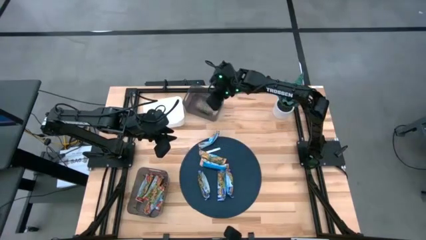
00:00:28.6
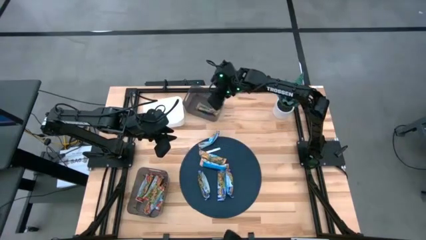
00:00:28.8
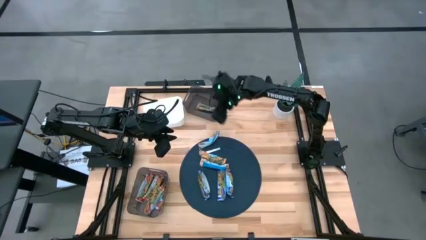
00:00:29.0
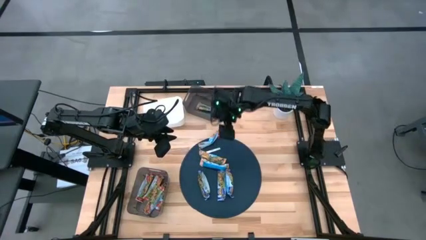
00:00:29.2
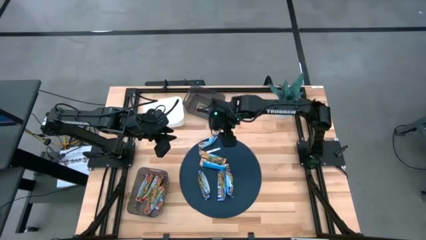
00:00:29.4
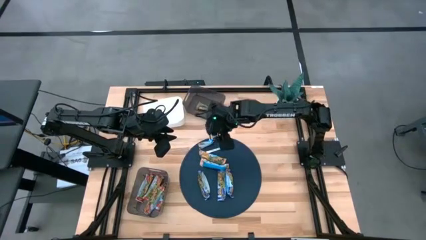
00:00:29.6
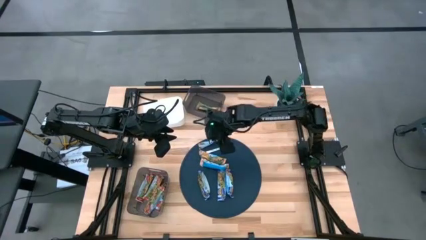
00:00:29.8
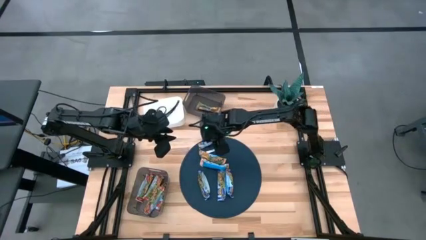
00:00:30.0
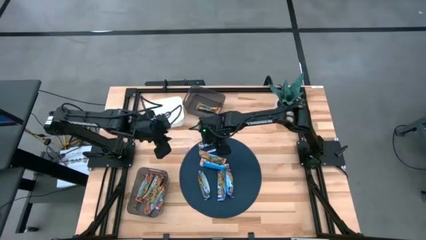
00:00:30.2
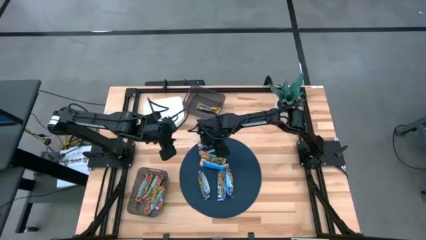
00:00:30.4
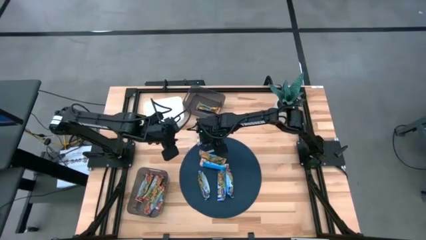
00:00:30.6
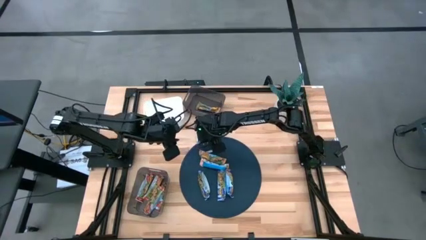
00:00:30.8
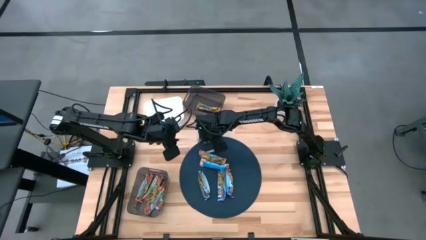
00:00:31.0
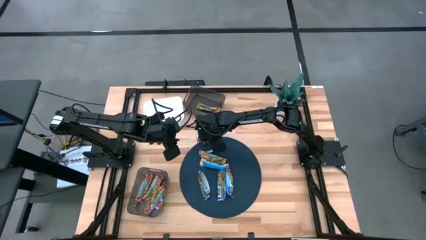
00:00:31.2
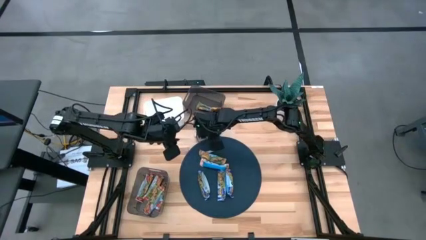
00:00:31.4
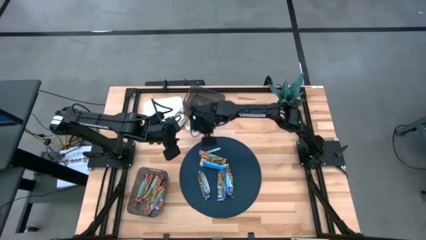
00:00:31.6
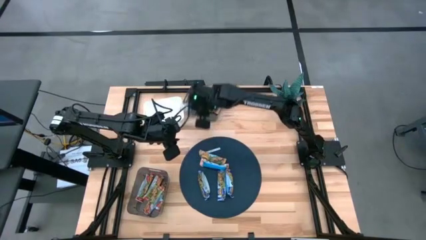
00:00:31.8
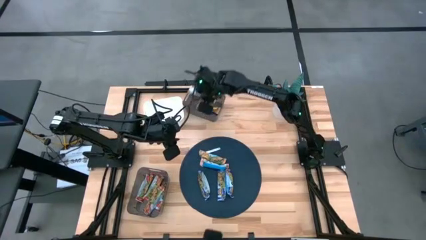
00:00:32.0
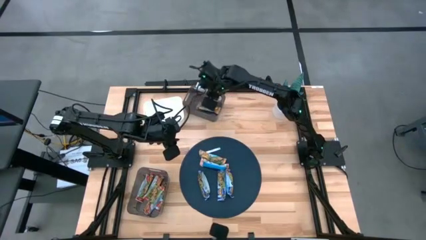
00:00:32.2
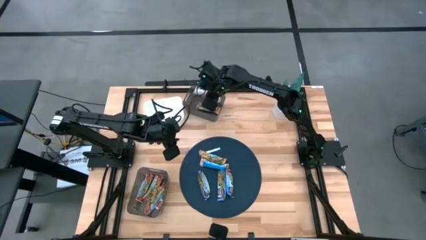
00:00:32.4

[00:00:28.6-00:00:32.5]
Task: Pick and place Granola Bars by type
Put the yellow granola bar into the top black bin

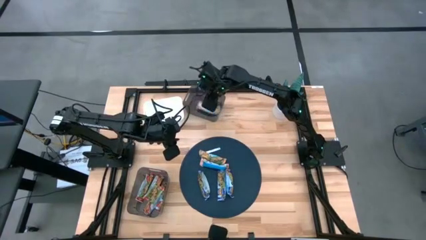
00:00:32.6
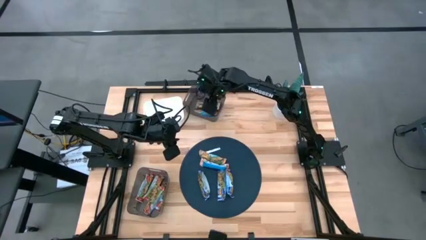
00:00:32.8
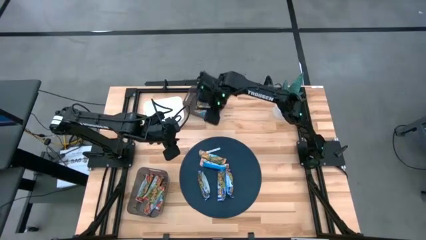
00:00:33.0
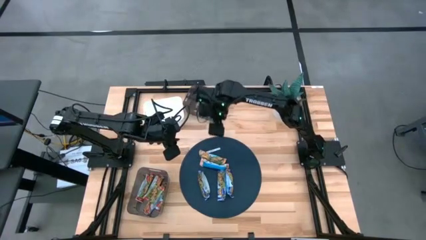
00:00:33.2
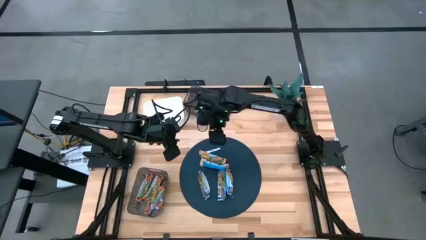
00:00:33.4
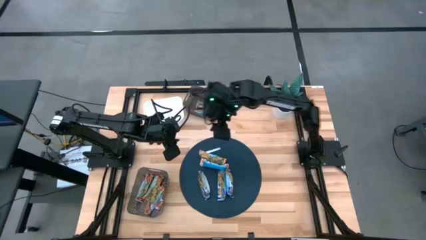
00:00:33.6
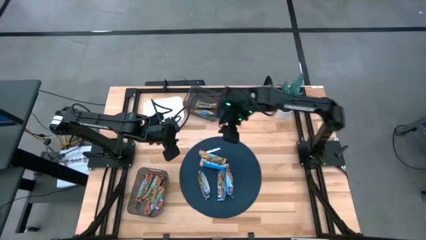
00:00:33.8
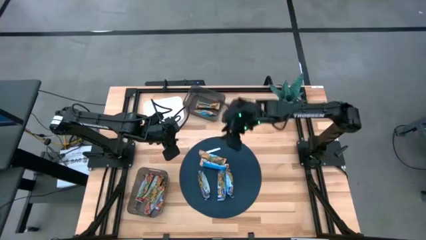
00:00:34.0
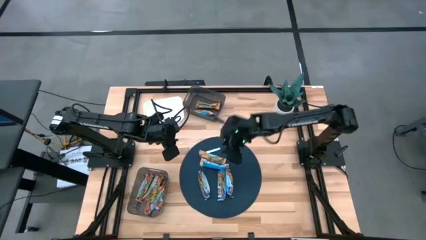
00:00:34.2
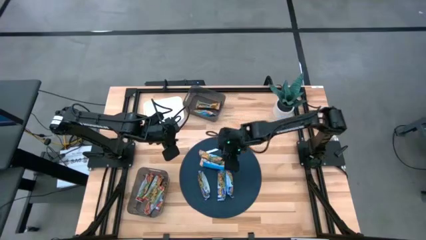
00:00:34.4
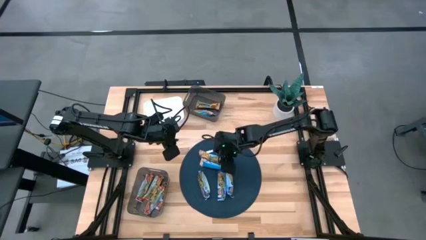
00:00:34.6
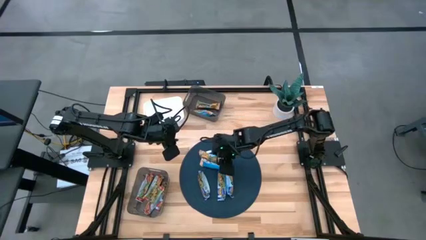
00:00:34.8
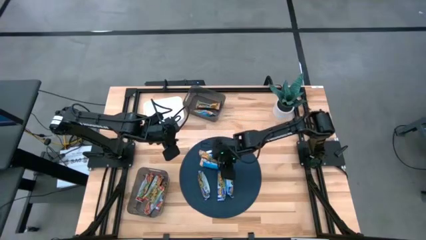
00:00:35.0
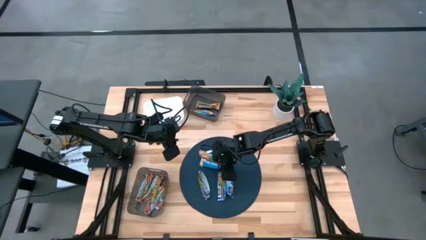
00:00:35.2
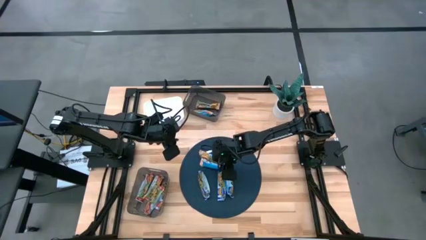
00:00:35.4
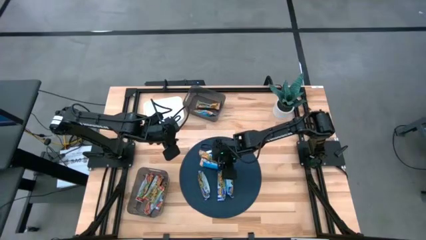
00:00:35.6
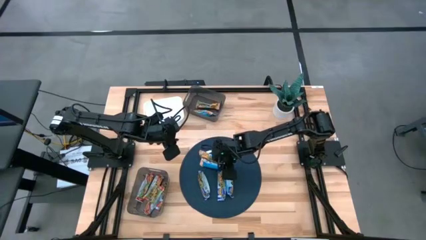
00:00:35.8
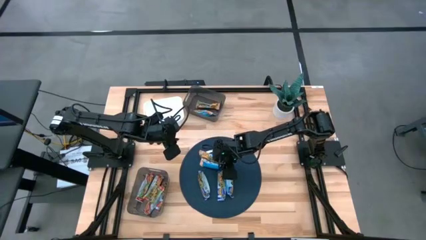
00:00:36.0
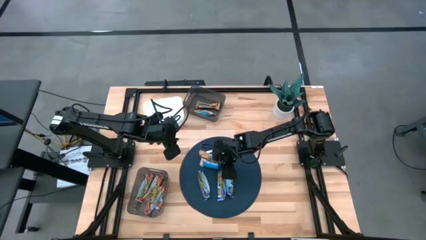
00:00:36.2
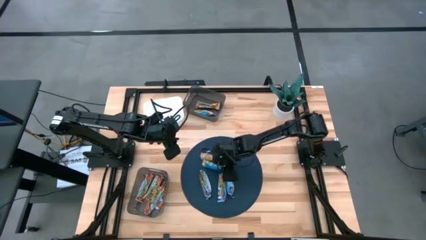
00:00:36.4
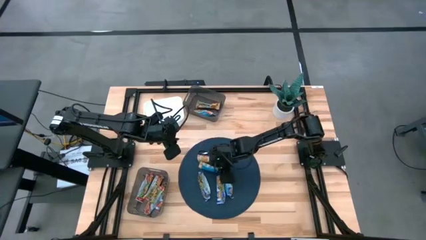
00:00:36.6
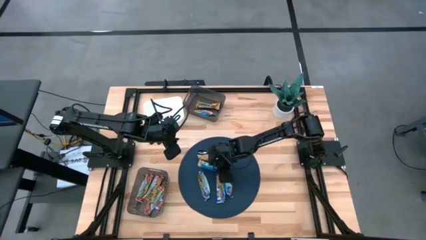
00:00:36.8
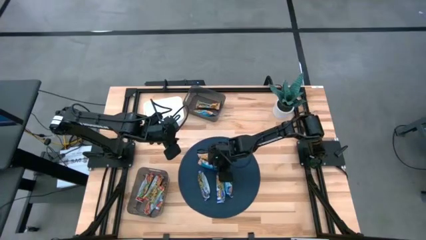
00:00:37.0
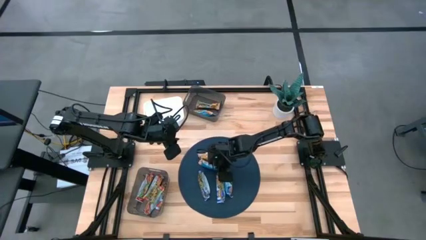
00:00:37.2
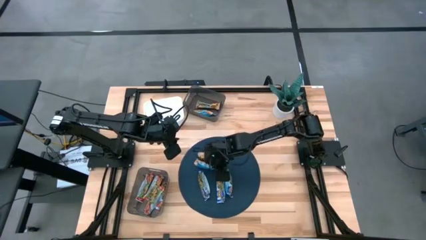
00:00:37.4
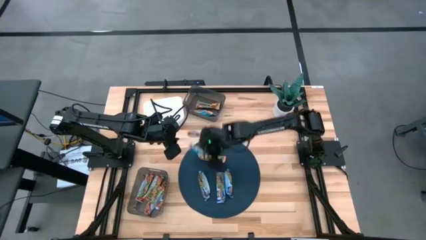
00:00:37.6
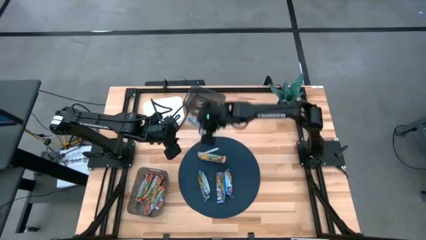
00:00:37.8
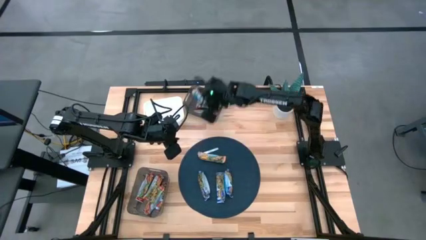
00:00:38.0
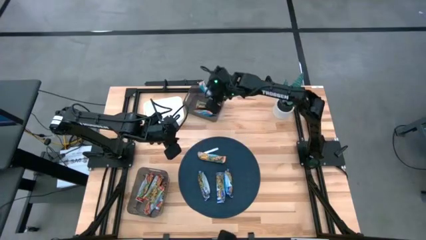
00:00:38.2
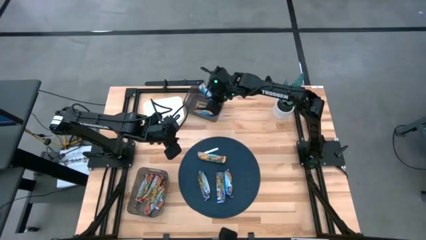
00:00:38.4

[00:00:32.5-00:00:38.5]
Put the yellow granola bar into the top black bin

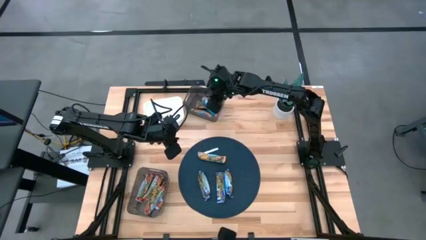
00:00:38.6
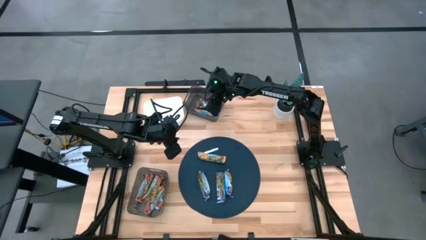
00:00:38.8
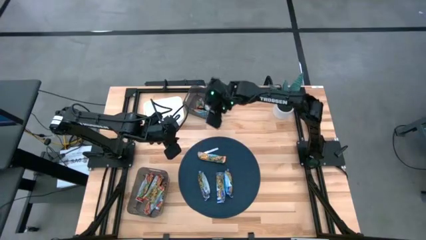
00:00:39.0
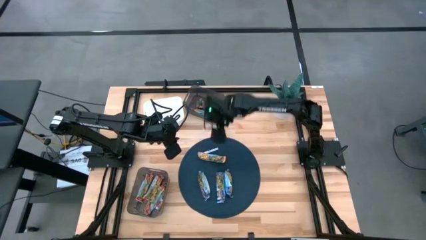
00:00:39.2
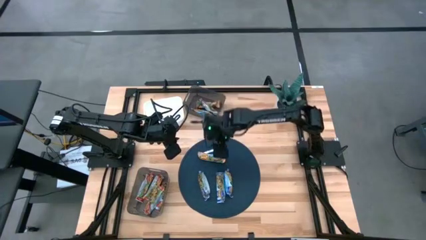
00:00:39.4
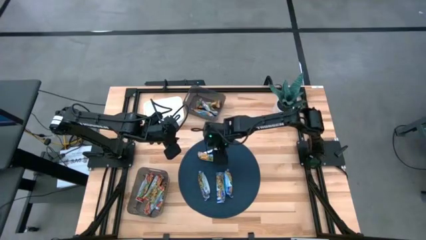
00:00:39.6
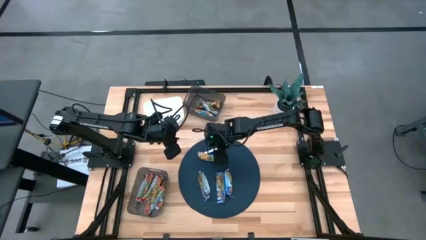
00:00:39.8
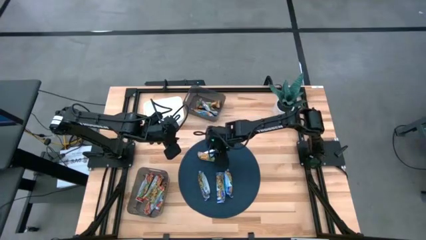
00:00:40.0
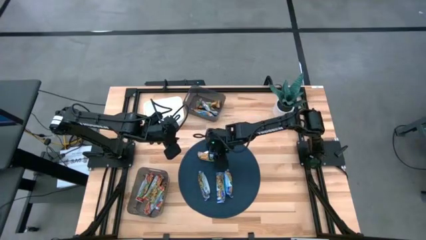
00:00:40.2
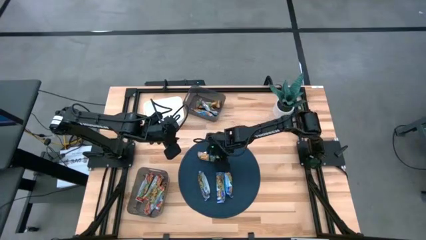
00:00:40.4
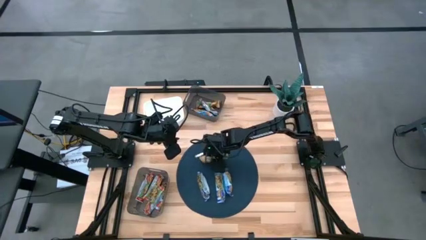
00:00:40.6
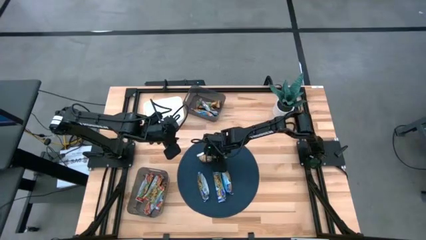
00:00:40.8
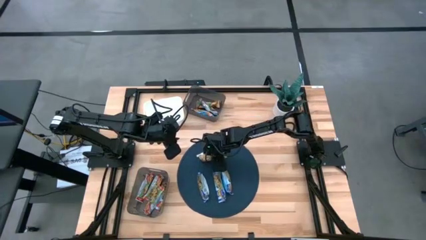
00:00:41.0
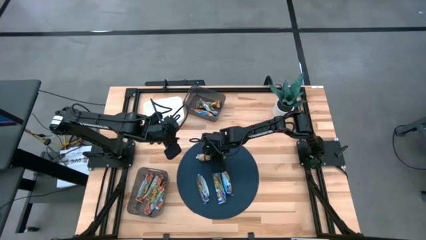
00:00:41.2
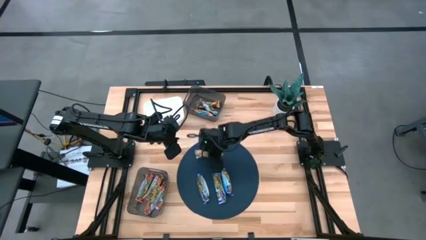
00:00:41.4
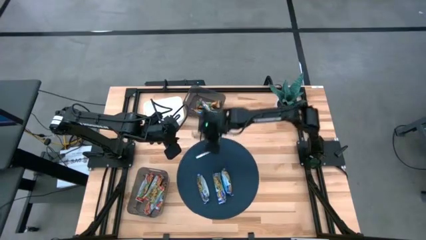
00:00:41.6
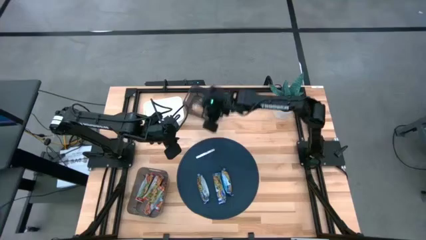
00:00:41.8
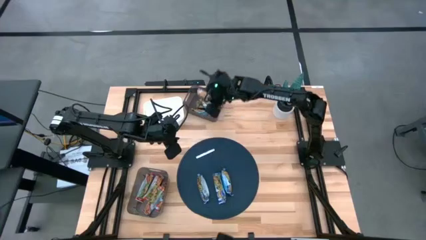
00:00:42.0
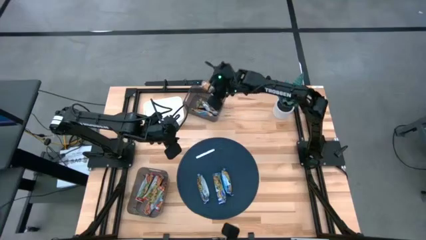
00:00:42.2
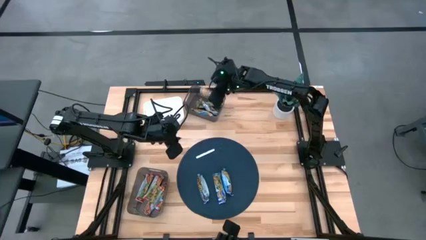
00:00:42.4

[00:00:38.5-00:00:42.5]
Put the yellow granola bar into the top black bin

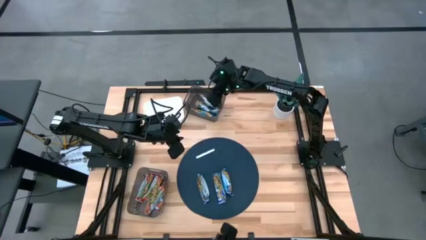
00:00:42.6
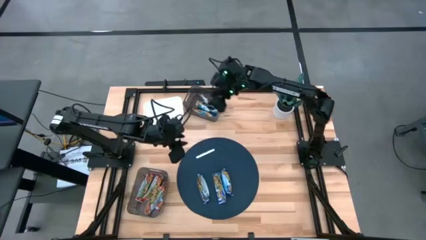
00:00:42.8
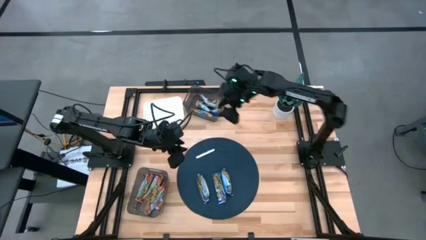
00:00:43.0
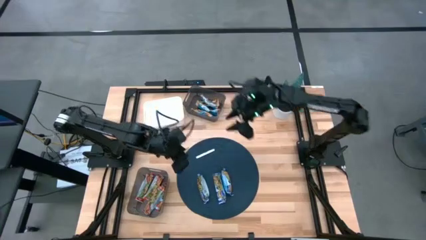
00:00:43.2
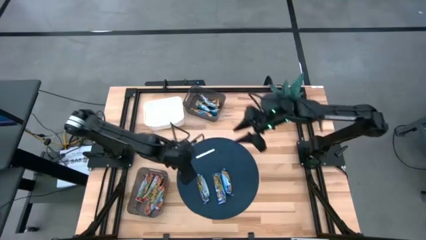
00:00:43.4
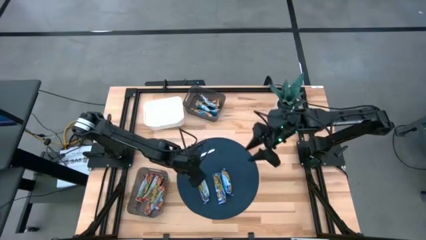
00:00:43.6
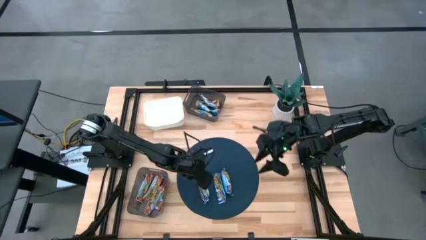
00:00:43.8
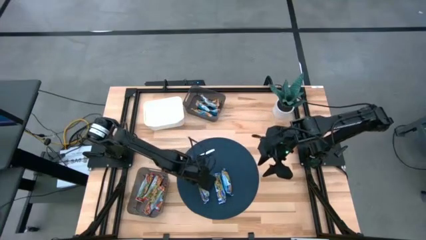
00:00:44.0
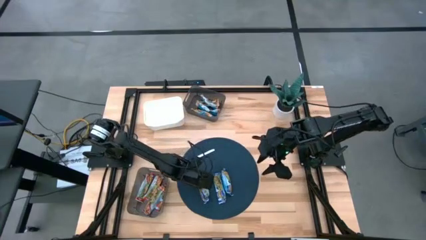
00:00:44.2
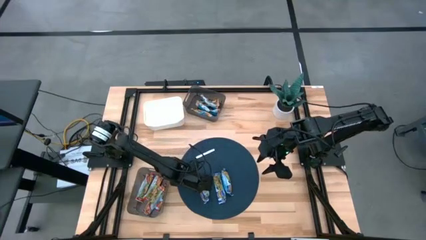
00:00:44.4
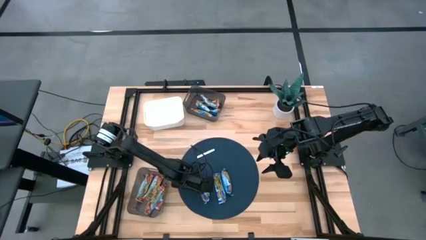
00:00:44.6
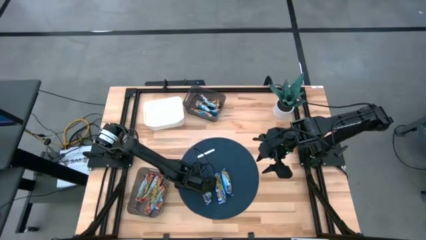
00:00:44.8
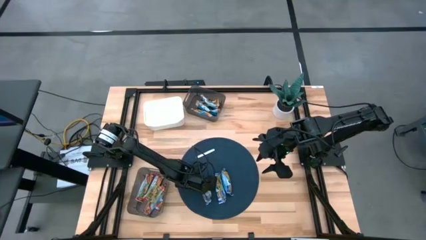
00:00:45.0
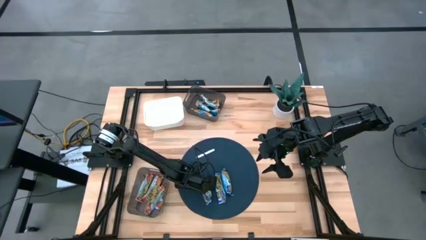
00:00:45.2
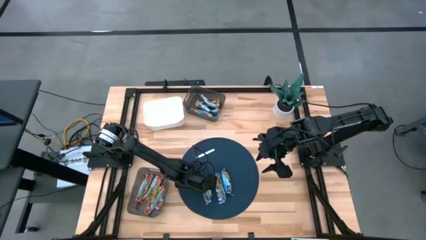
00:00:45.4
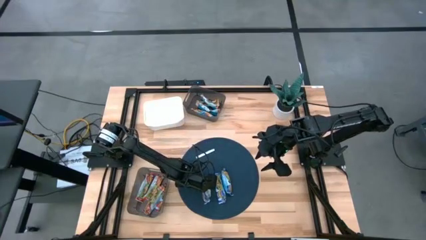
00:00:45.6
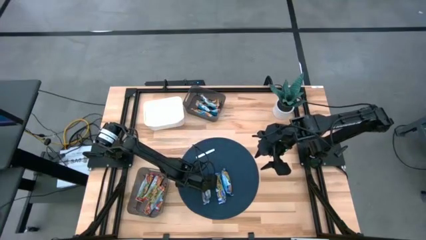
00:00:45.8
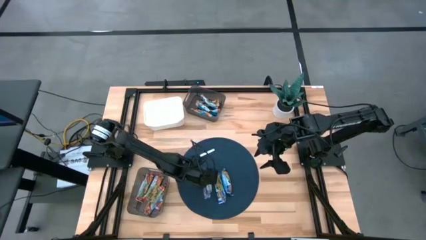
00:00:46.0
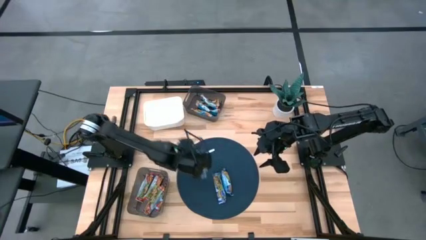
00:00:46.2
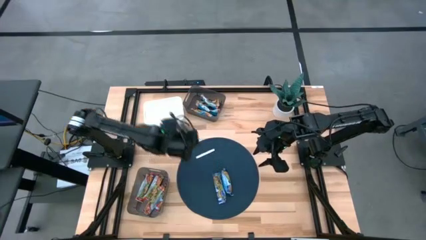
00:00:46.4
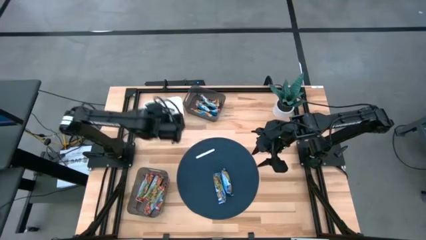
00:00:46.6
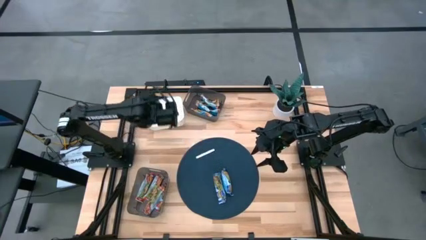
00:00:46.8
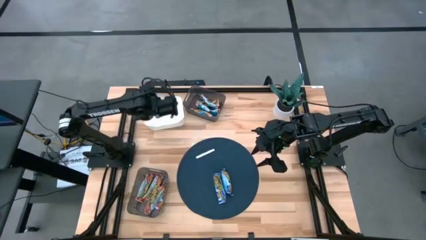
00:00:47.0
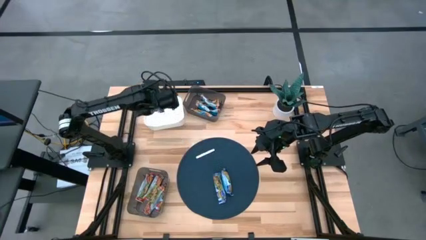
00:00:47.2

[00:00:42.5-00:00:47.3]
Put the blue granola bar into the white bin
